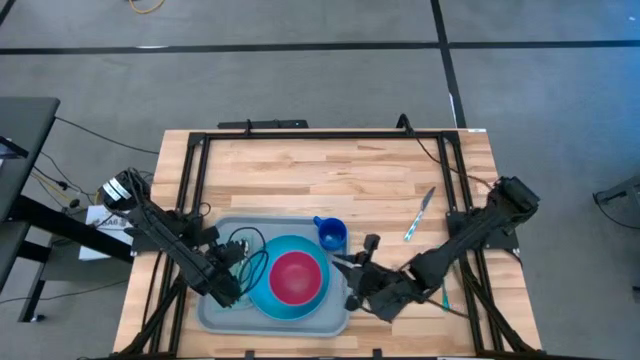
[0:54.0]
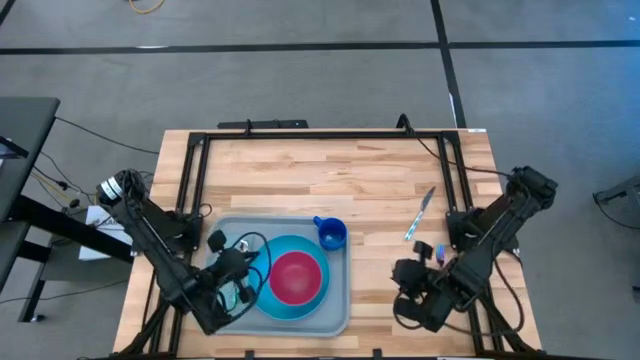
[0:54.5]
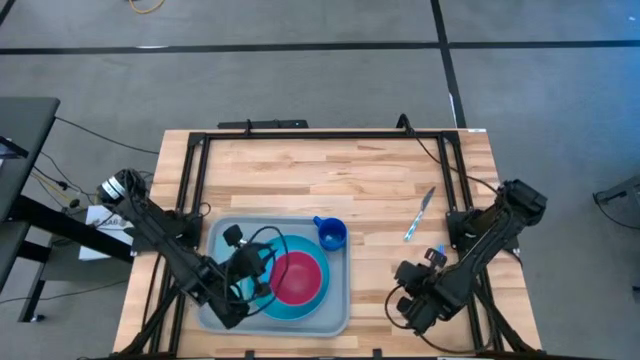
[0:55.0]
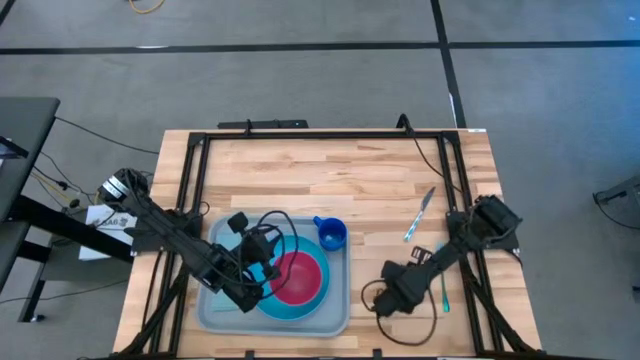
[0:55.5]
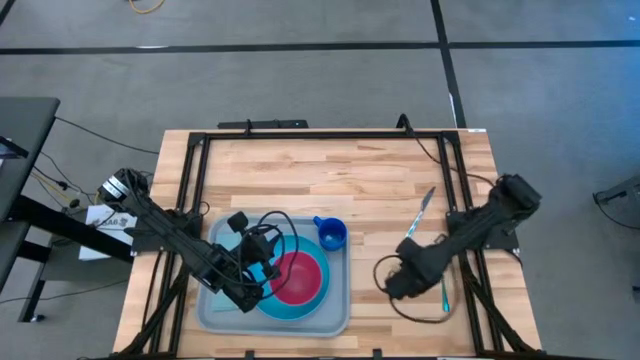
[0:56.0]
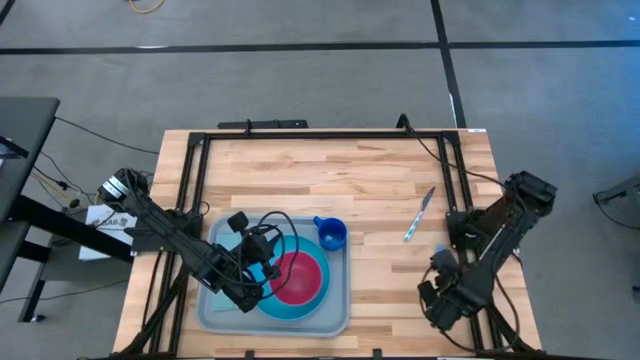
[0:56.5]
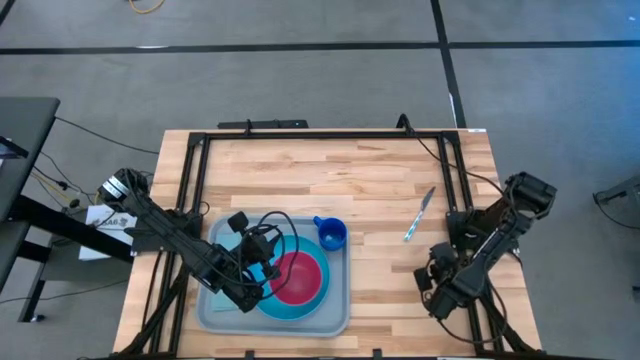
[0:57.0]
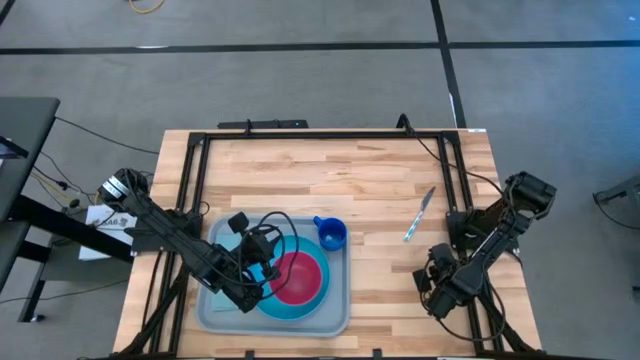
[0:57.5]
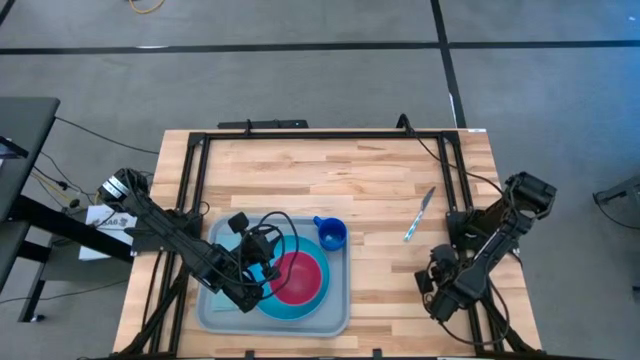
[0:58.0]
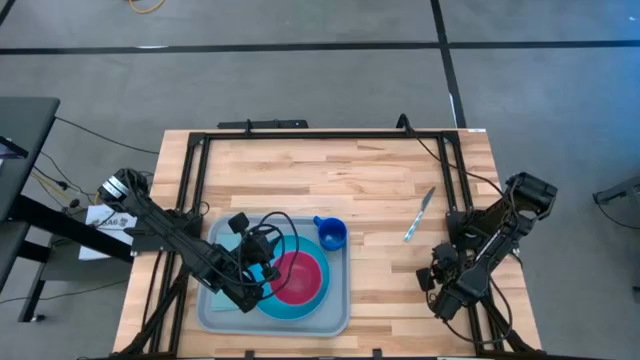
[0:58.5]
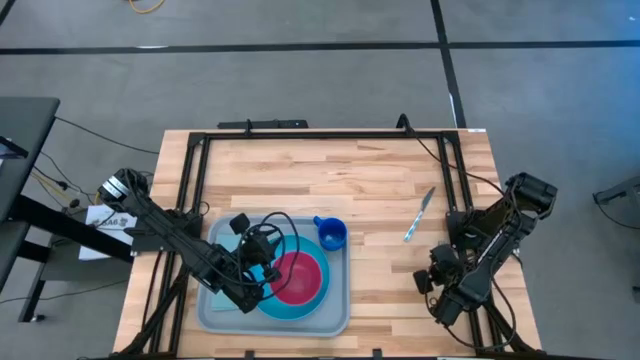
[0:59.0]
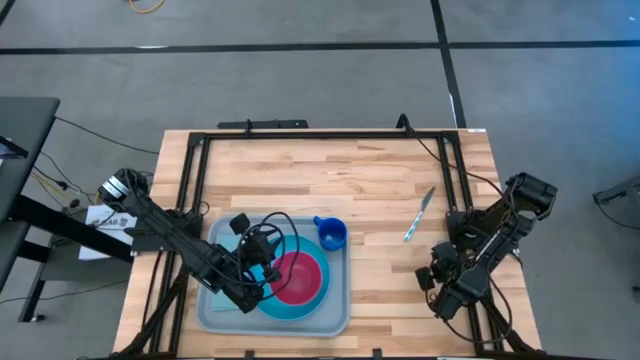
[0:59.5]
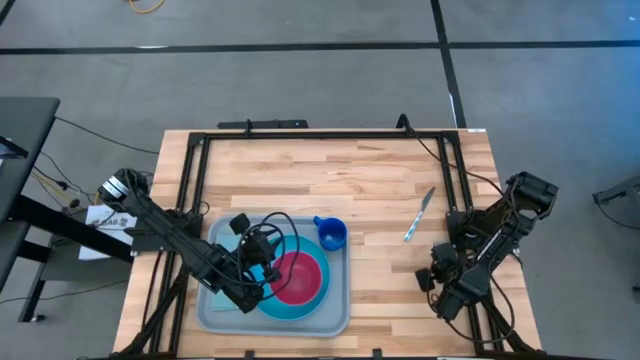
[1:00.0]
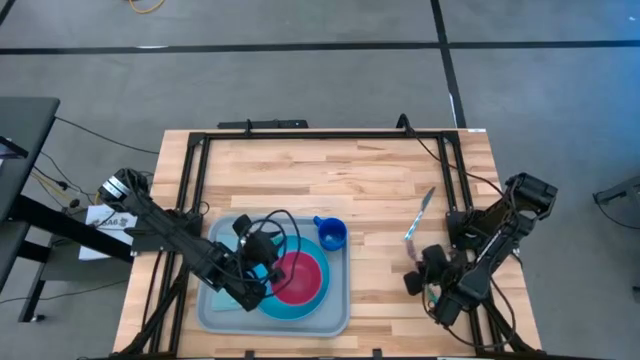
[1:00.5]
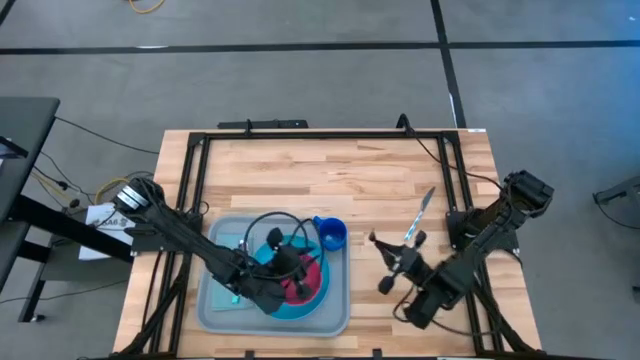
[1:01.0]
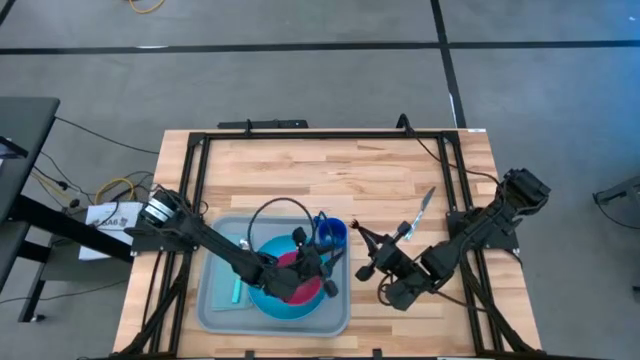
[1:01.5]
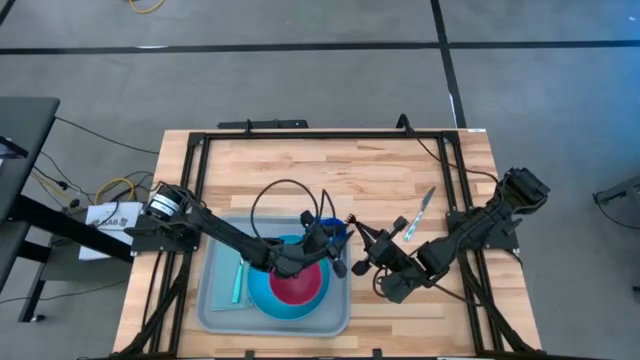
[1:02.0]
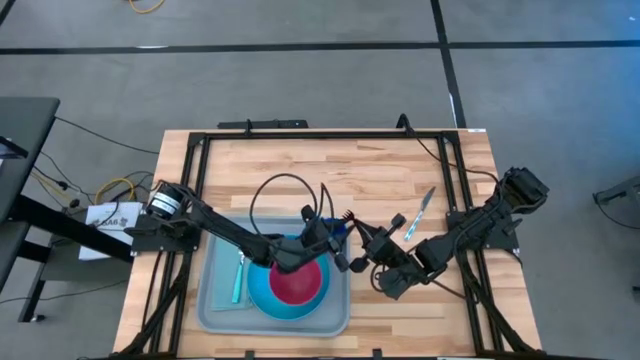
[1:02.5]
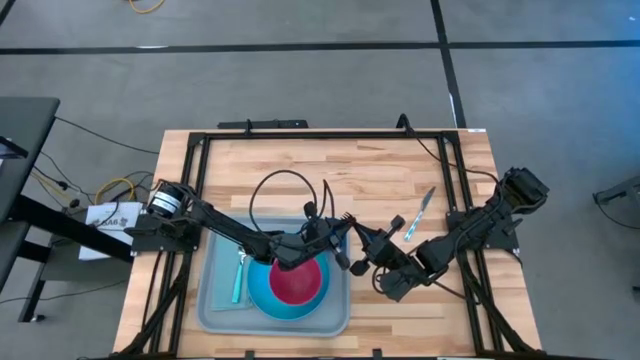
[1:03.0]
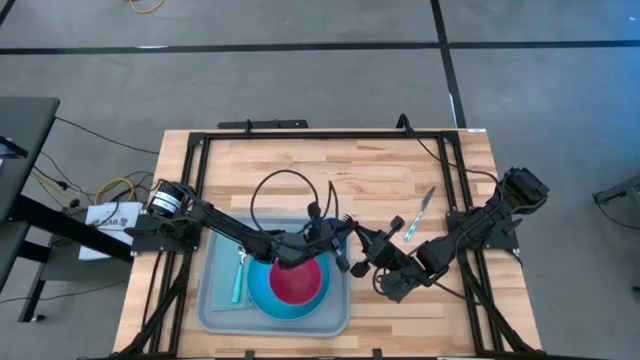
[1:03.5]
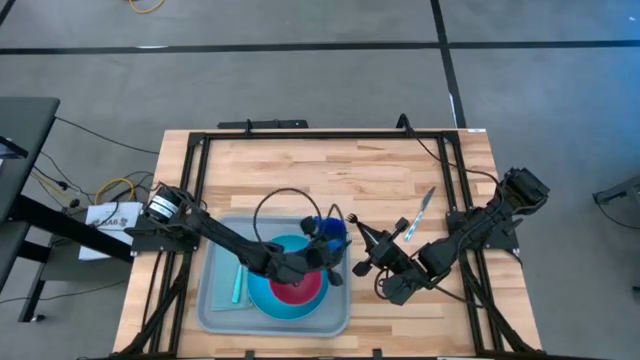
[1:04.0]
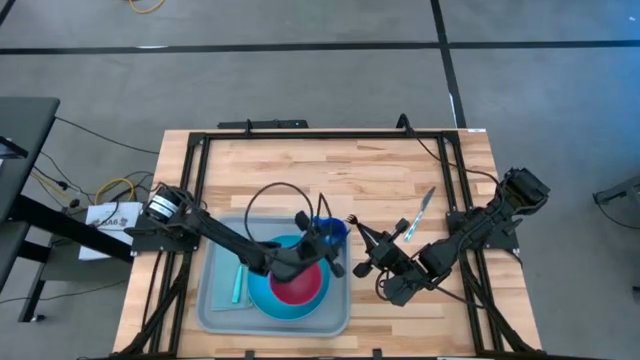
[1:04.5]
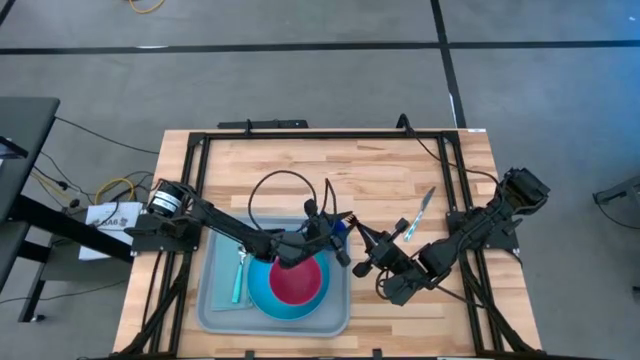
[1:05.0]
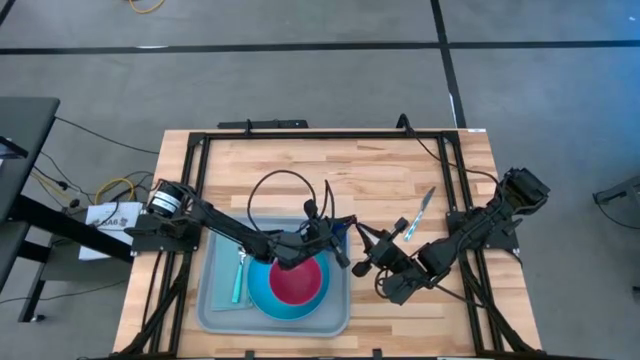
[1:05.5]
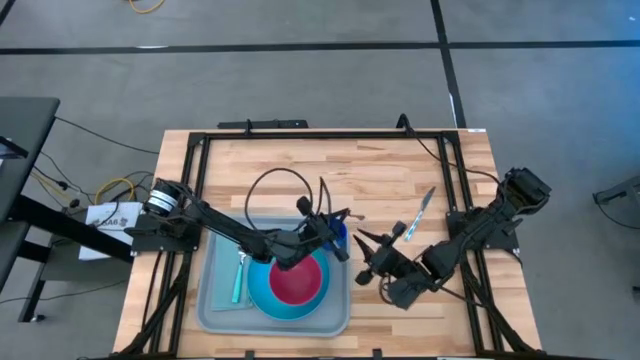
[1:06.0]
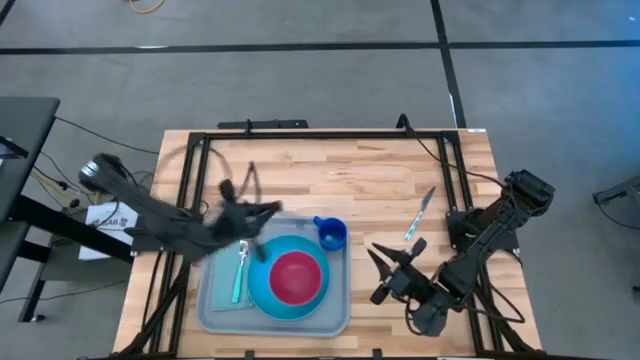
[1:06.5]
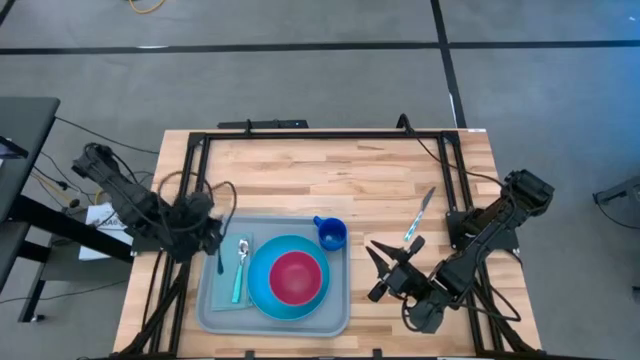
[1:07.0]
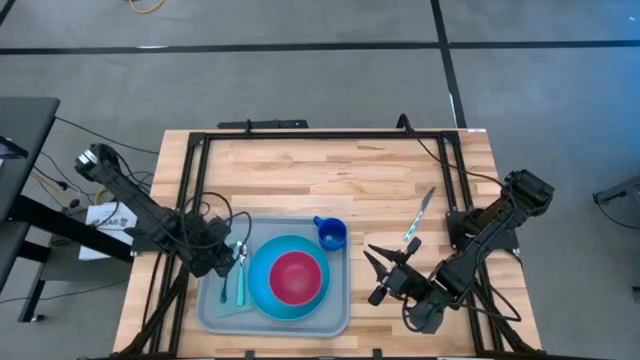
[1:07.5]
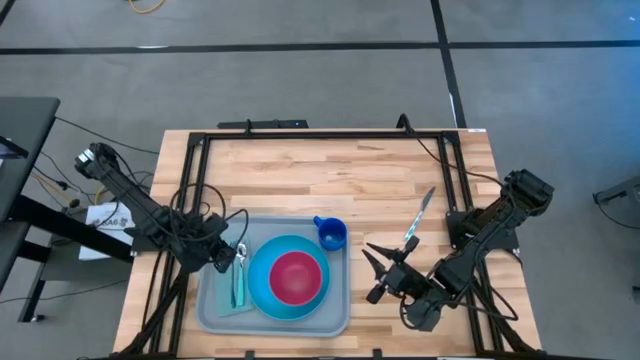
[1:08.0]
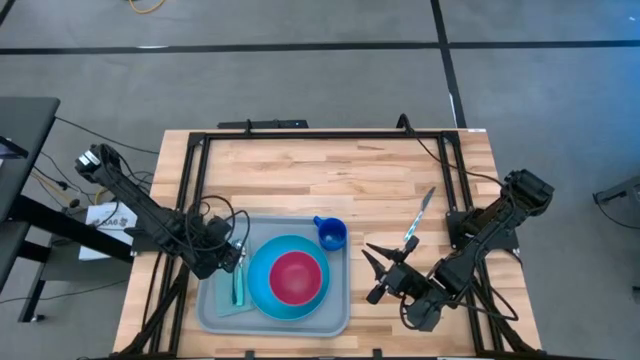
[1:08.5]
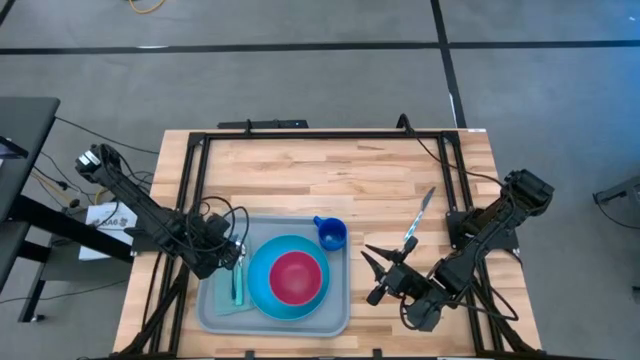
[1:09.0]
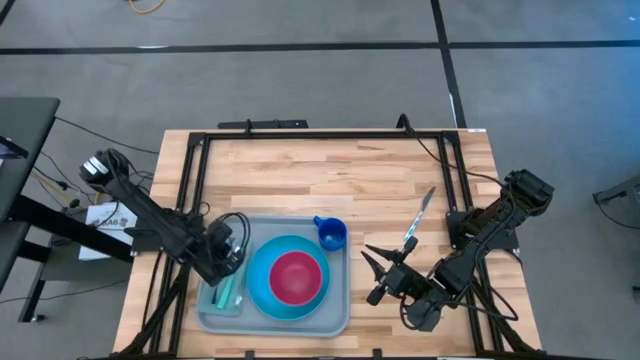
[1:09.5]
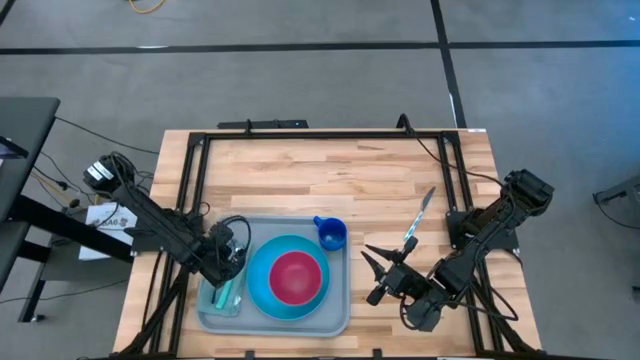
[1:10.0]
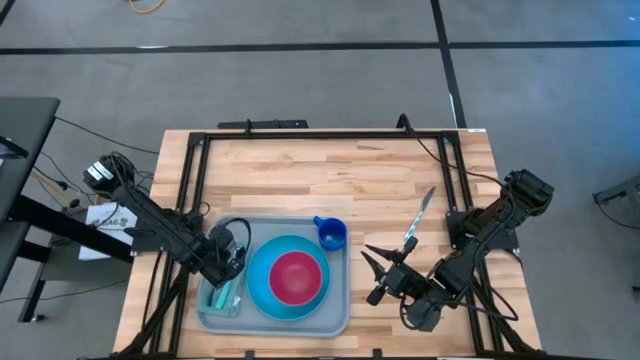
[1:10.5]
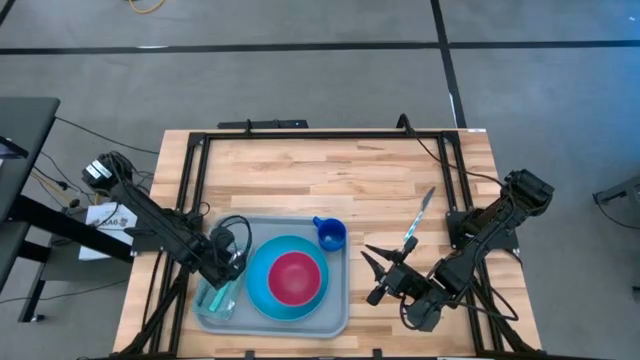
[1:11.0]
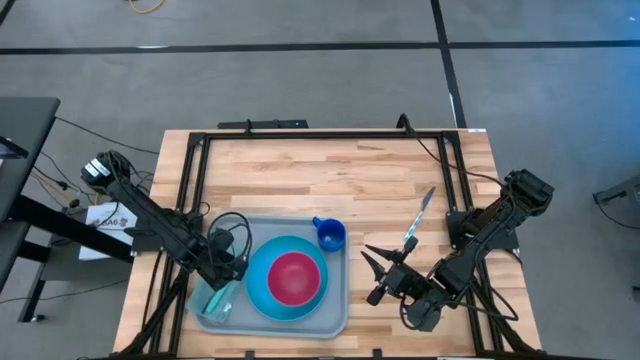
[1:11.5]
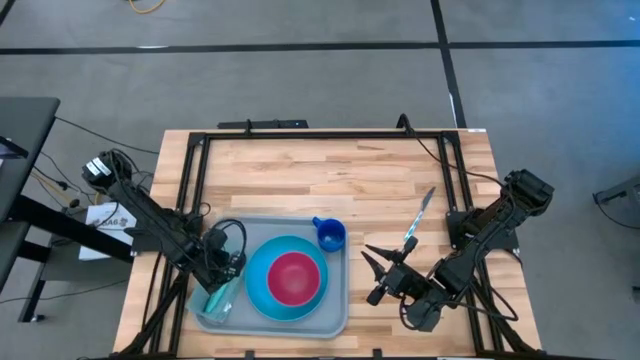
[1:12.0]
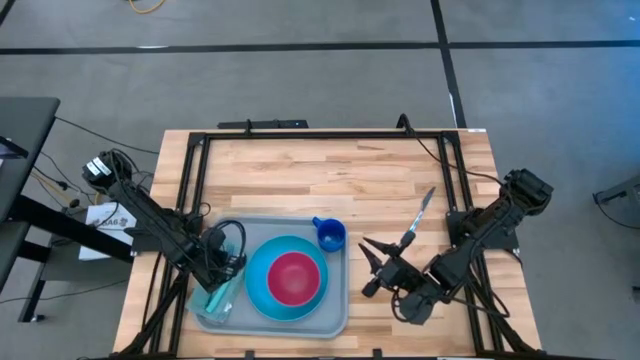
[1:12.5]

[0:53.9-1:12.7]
Task: Set up tray
Put the blue fork beside the green spoon on the blue napkin on the gray serving tray

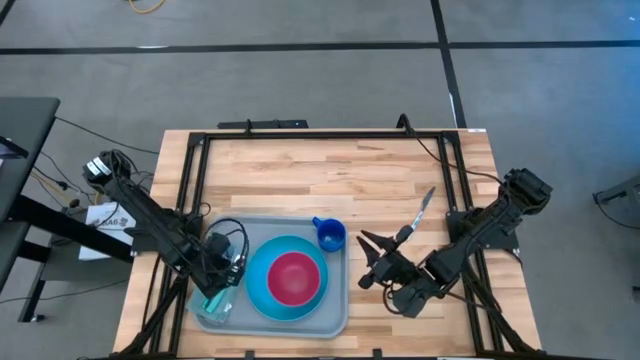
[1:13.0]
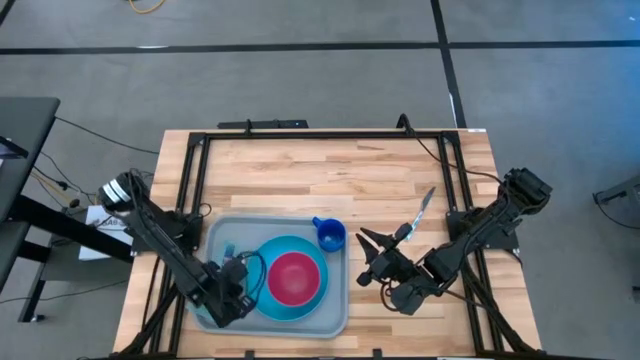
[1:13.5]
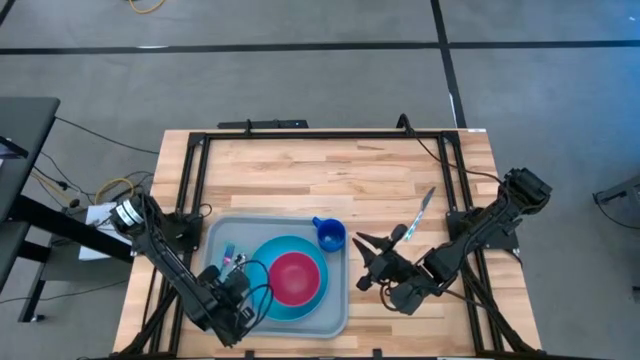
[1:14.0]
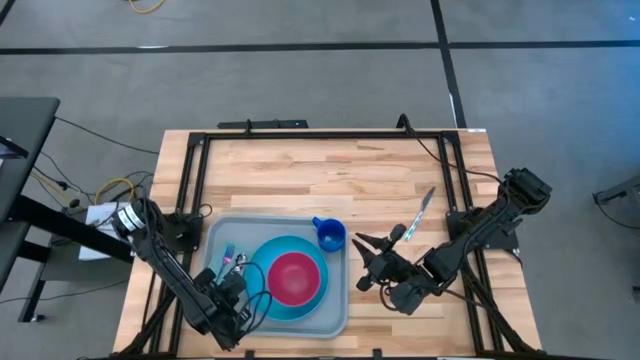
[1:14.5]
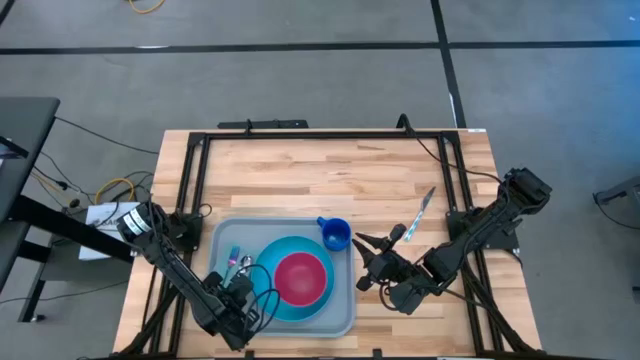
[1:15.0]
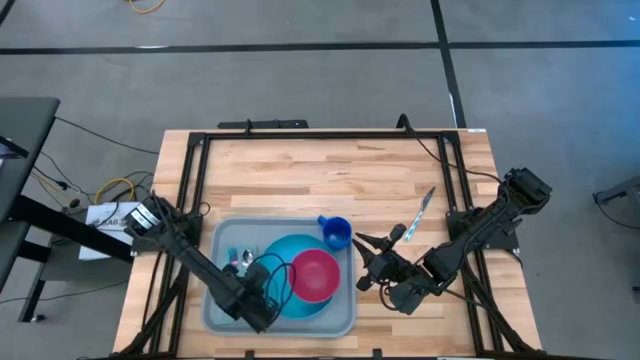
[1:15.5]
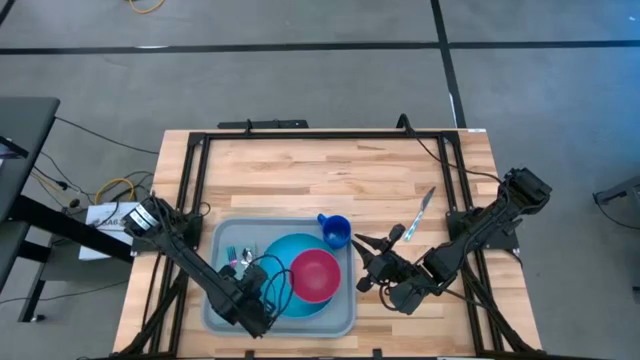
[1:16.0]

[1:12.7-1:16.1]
Adjust the blue napkin on the gray serving tray
